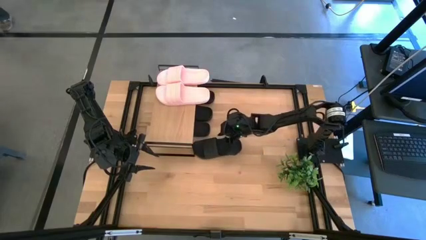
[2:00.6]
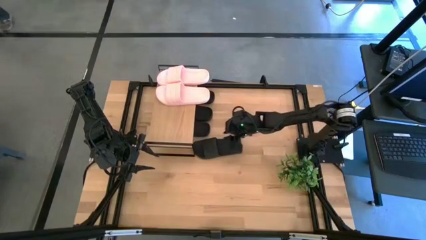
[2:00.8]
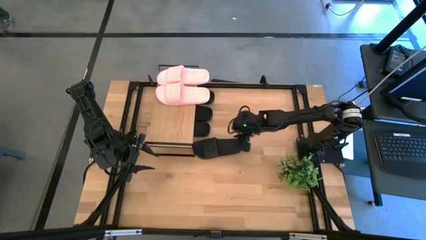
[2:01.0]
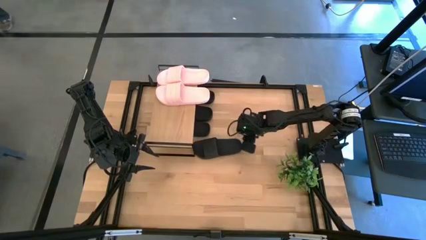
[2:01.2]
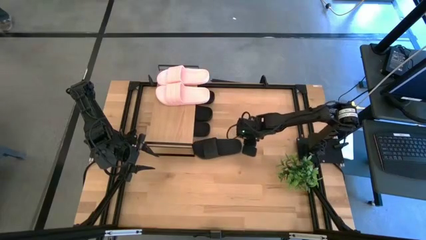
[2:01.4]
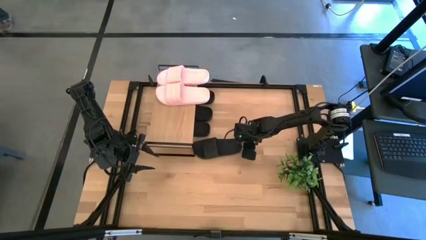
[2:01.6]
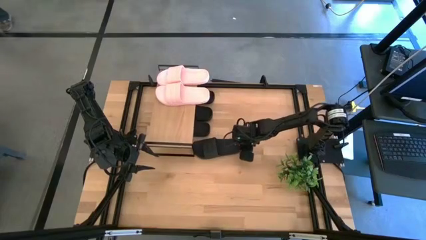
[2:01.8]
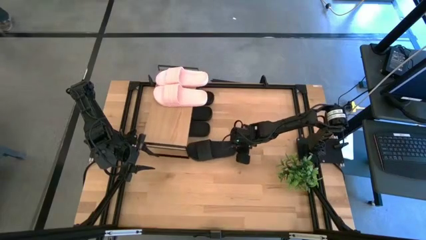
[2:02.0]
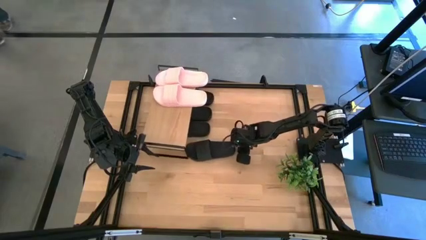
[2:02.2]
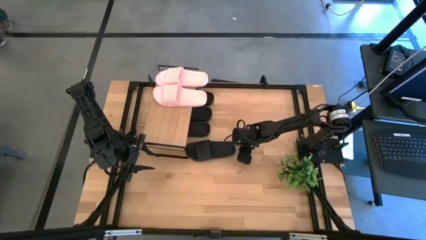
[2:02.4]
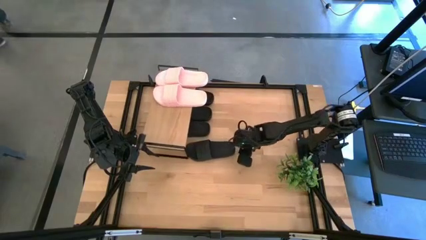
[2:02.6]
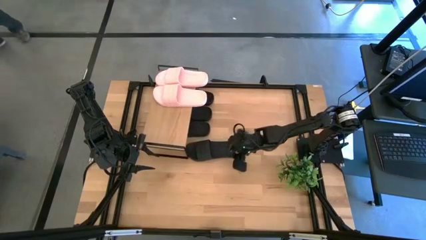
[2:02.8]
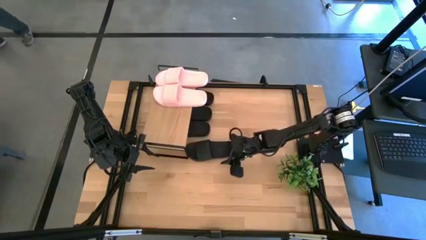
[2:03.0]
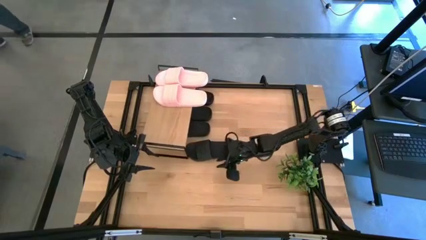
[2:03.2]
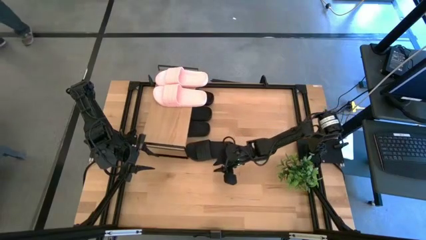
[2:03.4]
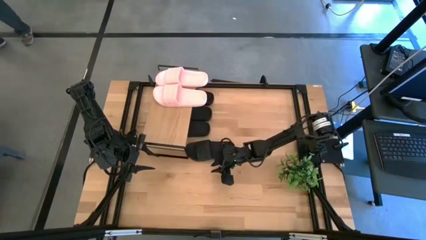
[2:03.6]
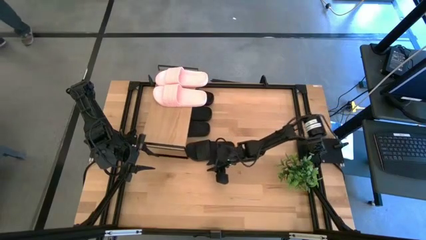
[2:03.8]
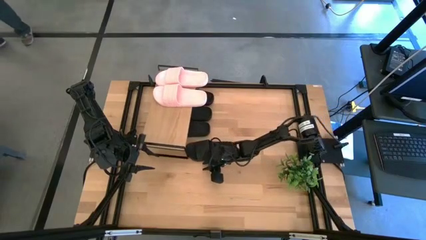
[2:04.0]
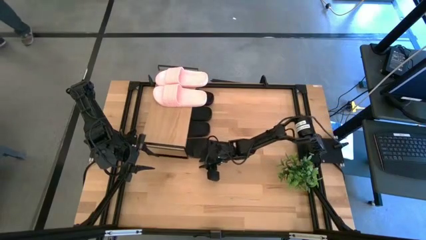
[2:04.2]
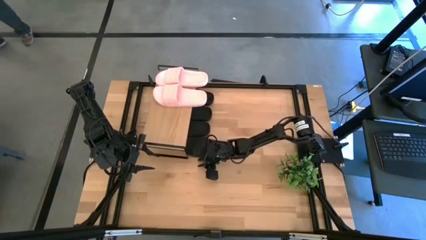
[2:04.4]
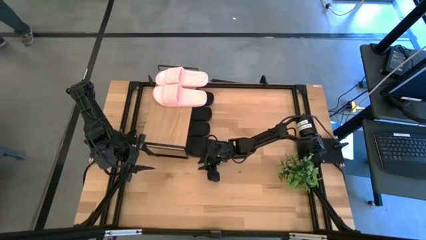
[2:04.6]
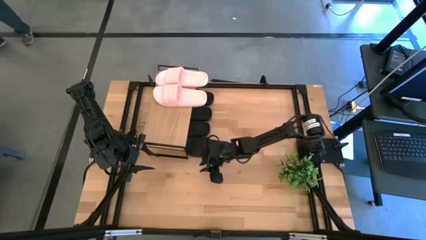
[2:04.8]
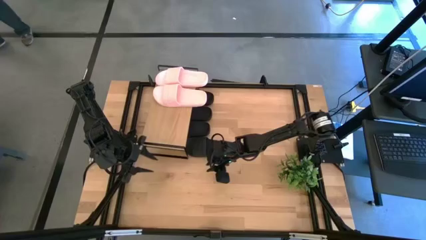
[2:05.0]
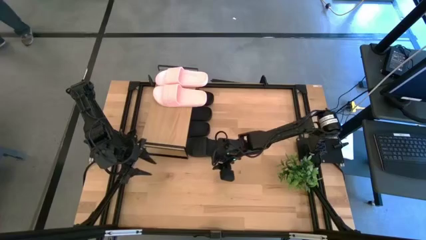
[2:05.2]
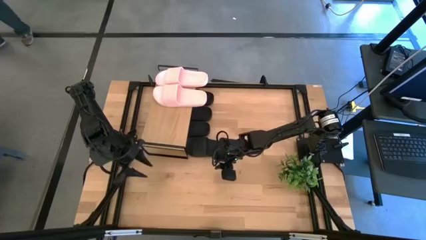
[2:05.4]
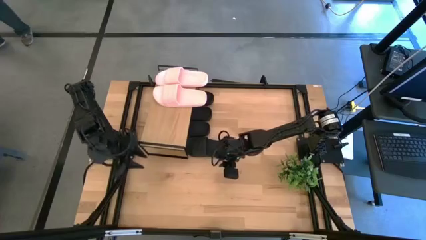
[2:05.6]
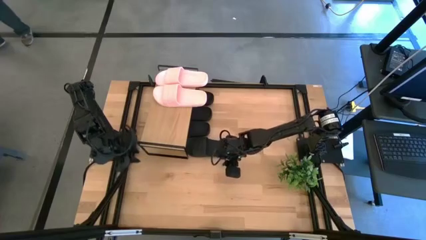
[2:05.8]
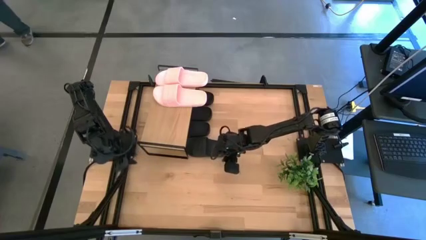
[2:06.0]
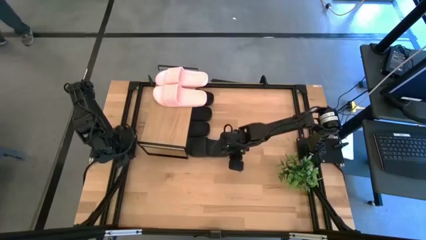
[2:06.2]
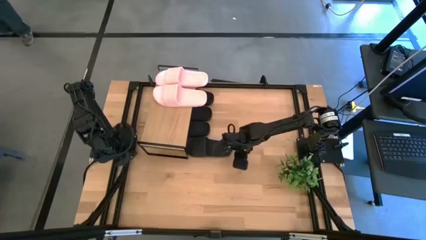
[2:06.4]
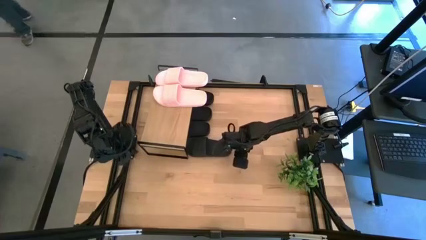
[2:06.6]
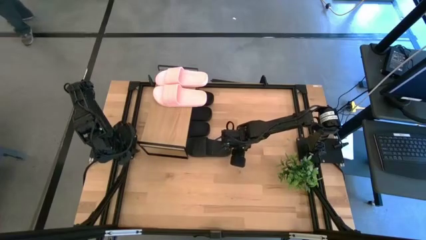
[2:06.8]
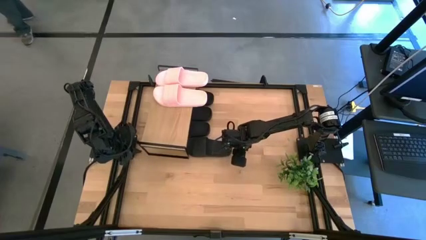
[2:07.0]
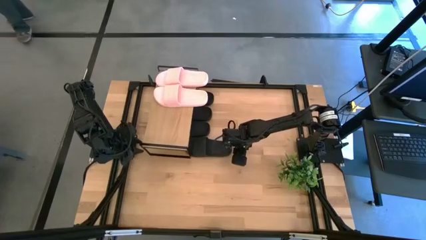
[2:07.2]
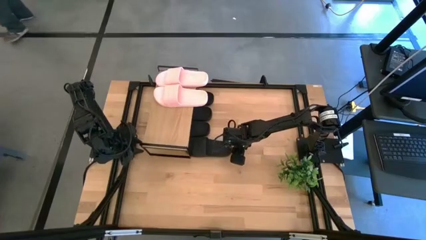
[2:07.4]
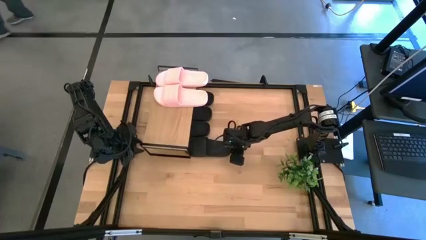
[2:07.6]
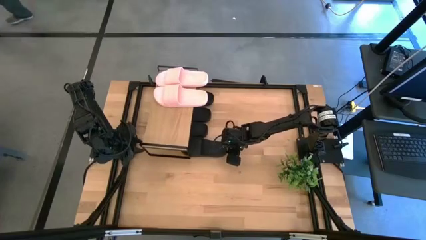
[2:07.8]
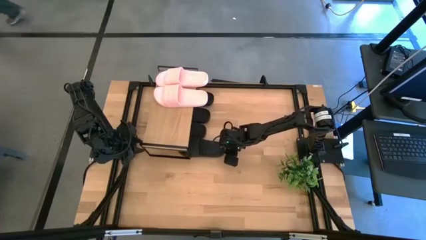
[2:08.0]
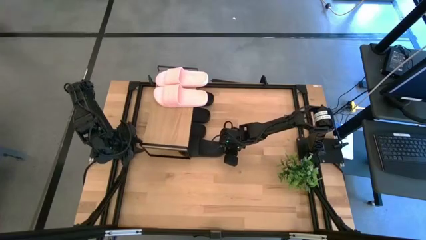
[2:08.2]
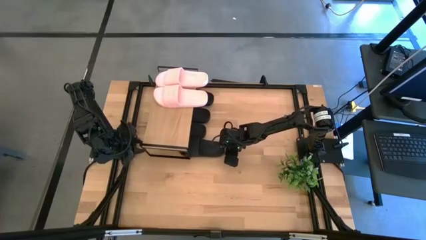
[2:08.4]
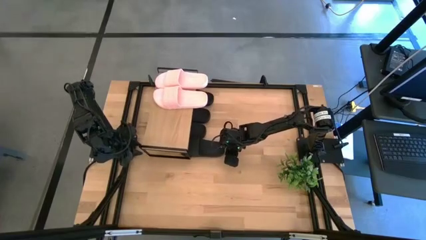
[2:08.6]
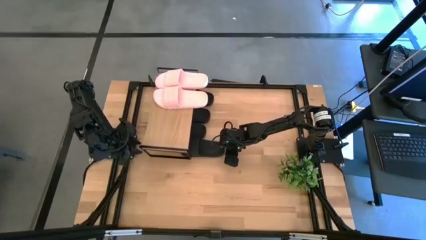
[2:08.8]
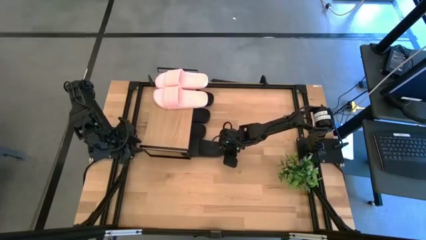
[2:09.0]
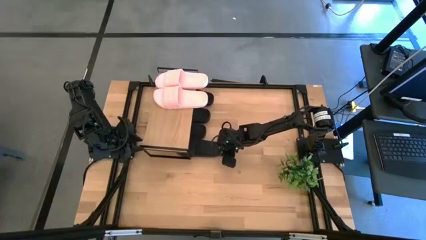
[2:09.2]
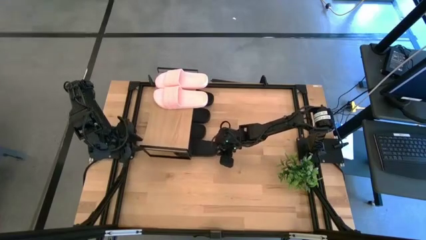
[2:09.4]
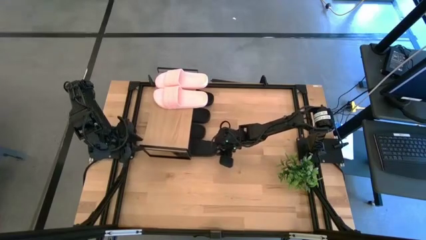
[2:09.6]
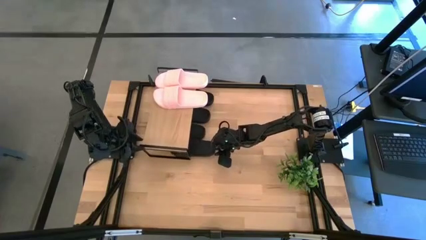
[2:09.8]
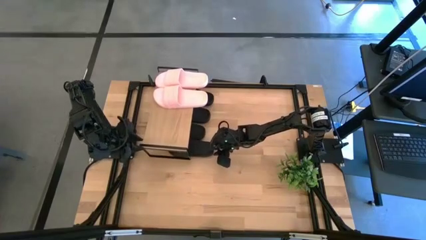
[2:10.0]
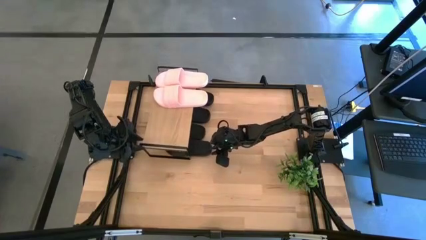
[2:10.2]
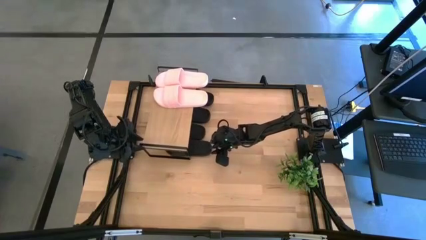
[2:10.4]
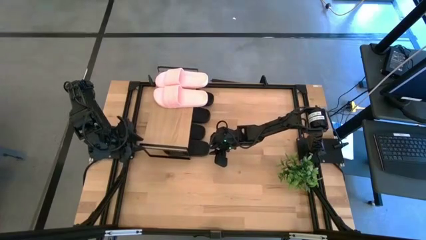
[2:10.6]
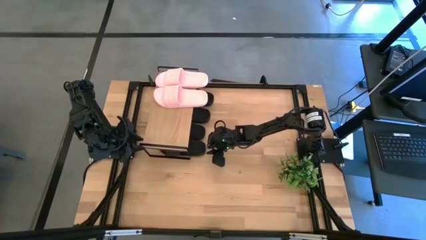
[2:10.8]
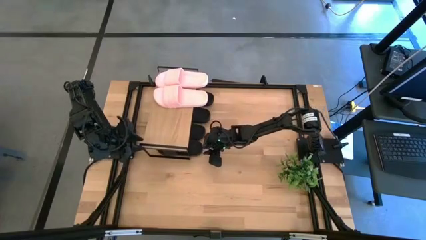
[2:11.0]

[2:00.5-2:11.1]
Task: Pick and place slides into the shelf
Put the black slide under the shelf

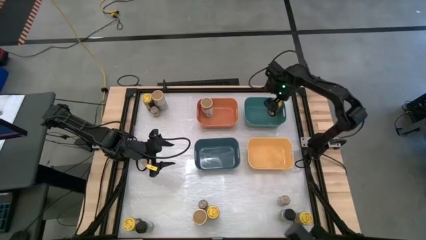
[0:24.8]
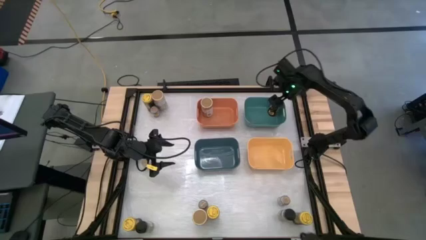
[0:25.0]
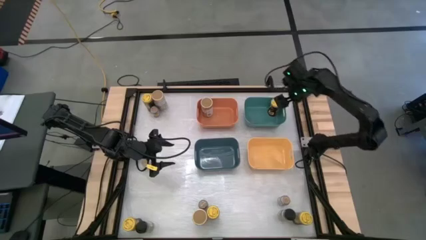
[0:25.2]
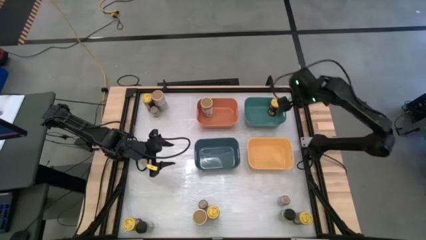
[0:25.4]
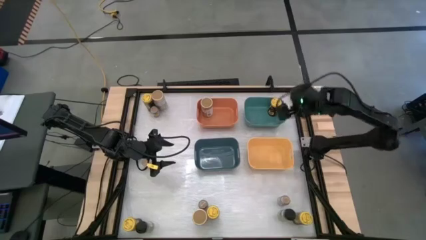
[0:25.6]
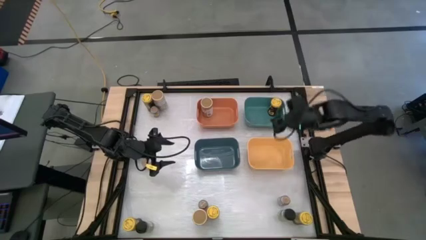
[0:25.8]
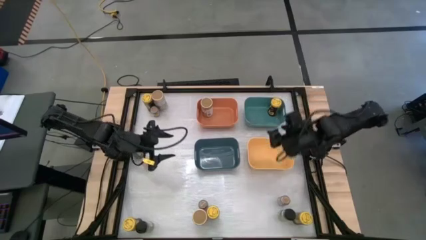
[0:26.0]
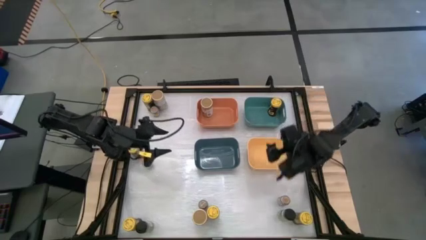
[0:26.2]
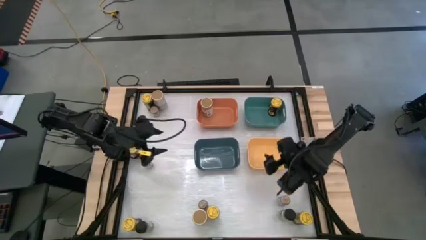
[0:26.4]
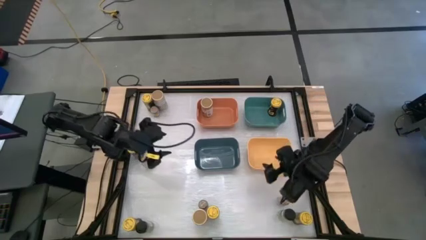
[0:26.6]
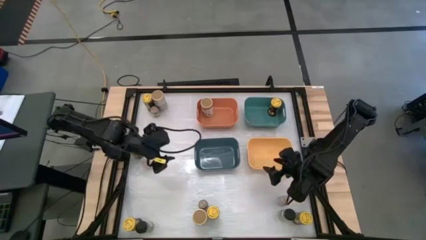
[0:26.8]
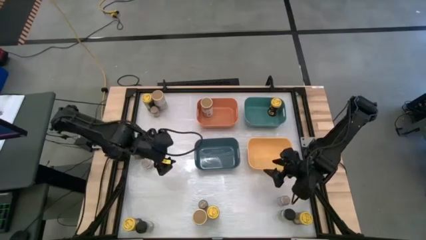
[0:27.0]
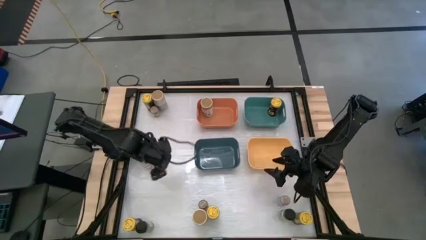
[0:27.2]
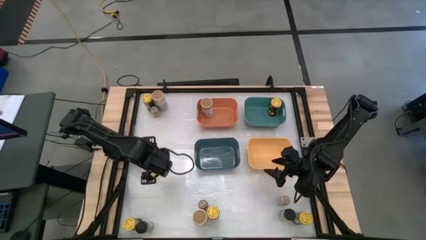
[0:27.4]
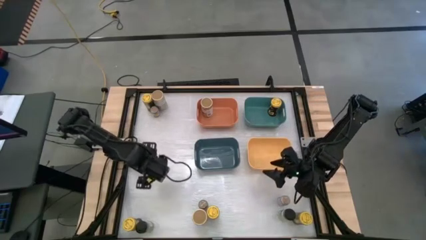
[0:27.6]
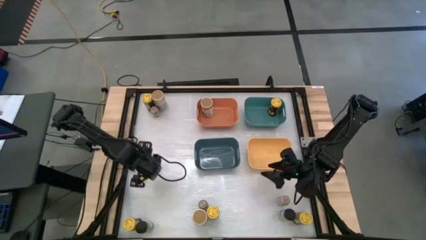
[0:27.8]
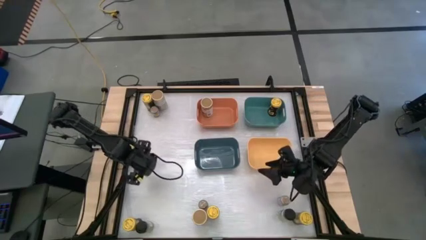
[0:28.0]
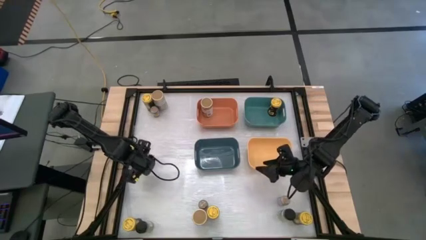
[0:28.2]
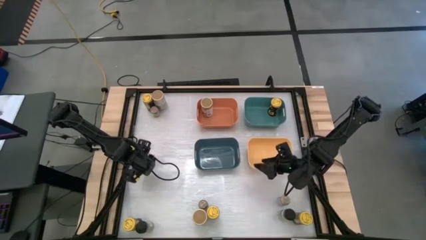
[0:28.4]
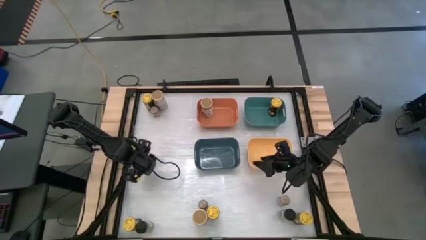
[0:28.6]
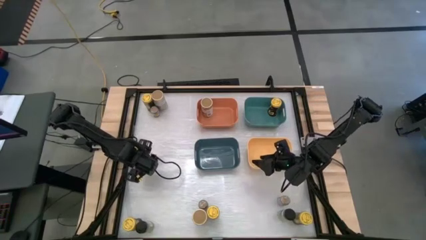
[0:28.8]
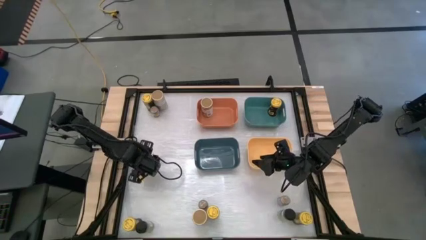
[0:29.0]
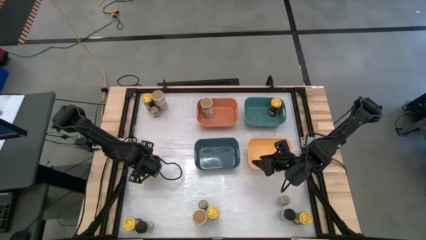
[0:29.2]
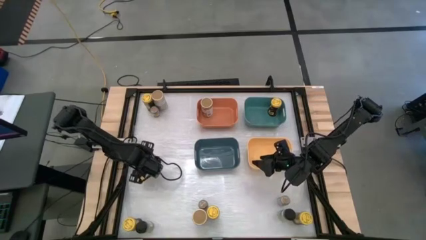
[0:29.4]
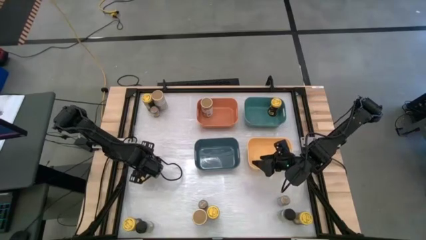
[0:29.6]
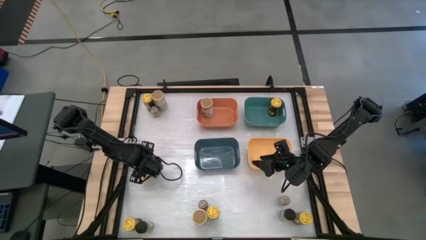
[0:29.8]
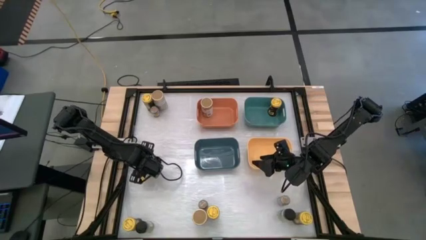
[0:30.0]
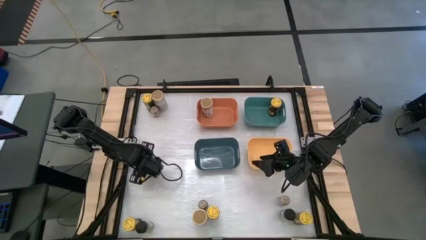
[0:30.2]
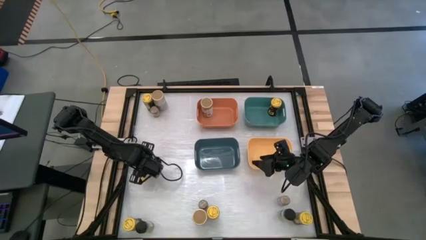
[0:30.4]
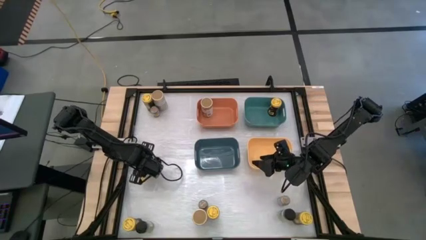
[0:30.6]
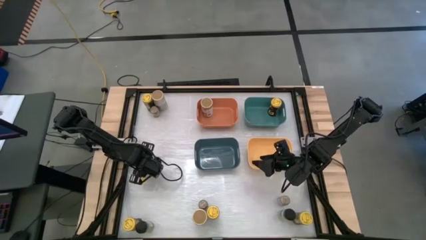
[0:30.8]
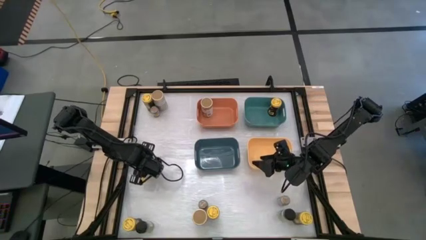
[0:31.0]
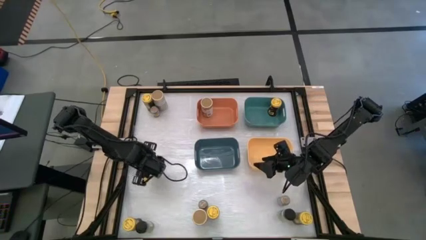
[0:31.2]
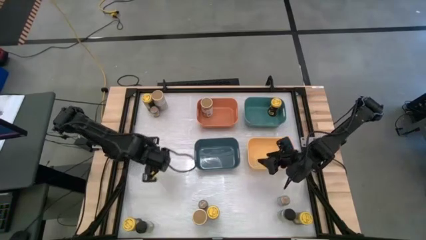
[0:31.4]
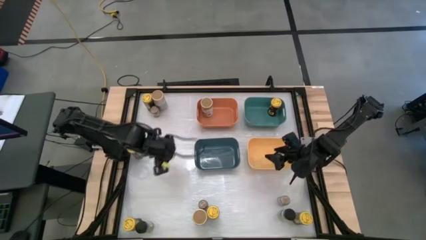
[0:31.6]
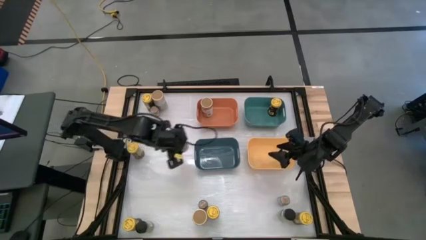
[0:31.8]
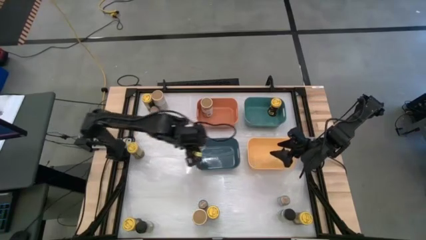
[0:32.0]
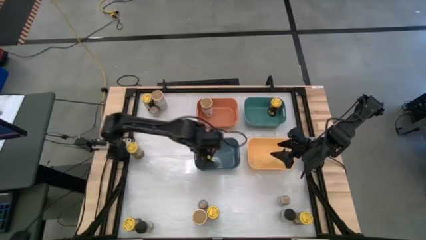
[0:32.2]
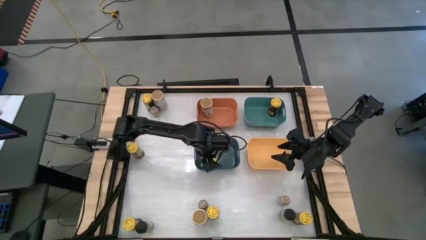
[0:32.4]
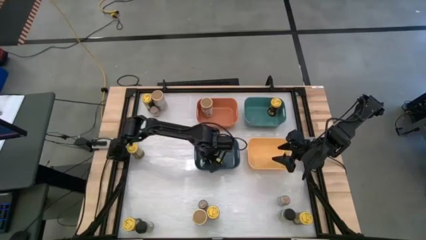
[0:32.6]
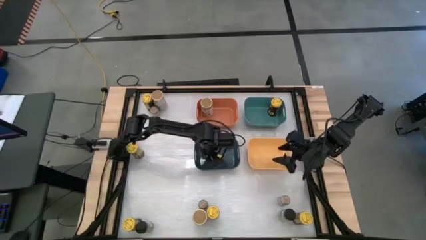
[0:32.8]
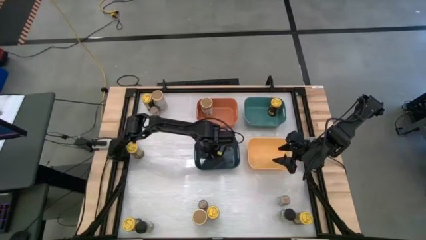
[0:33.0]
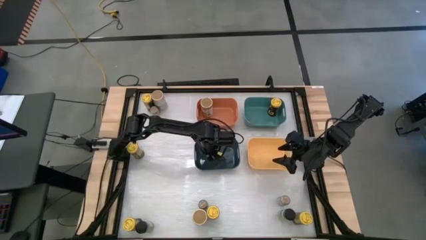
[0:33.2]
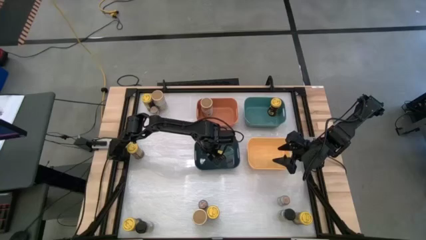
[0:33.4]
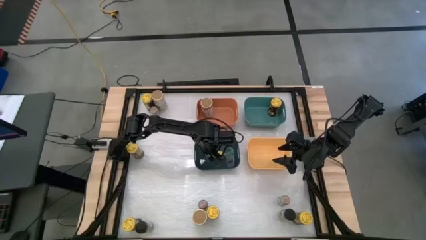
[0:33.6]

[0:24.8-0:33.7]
Task: Sort spices by type
Put the brown spice bottle into the blue bin
